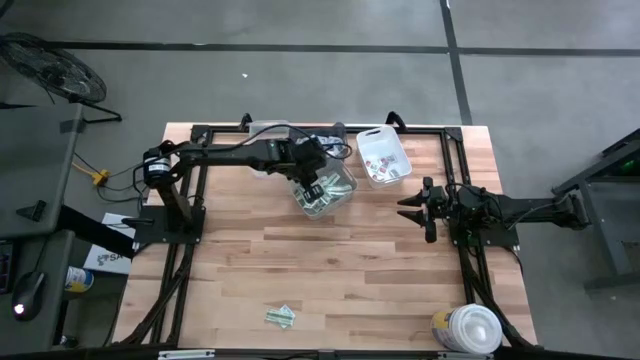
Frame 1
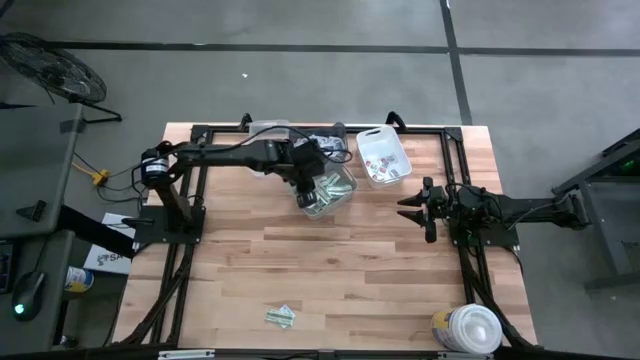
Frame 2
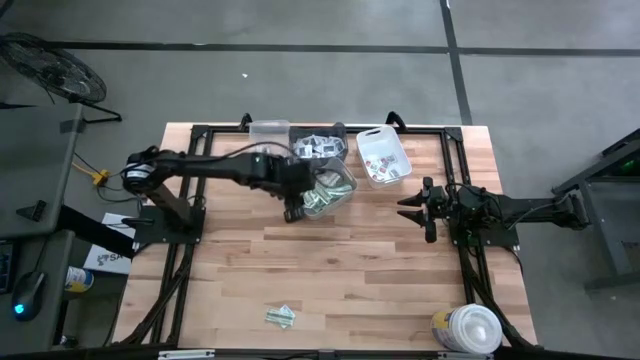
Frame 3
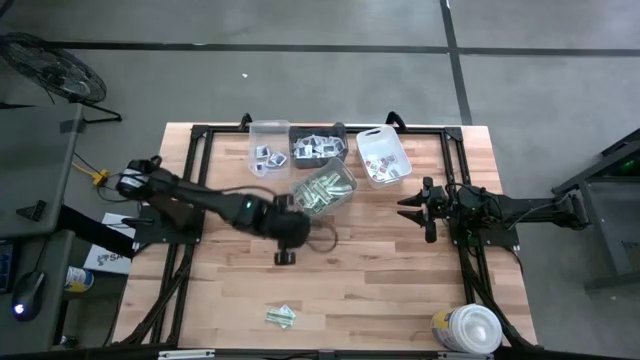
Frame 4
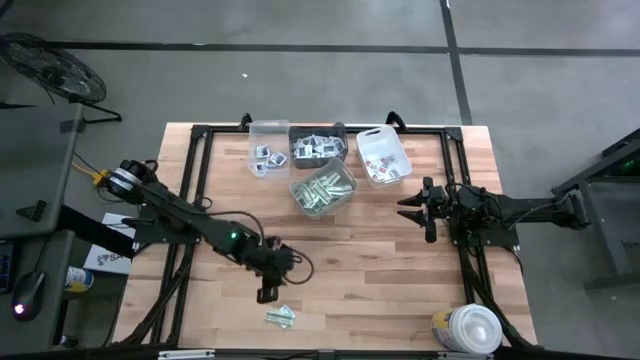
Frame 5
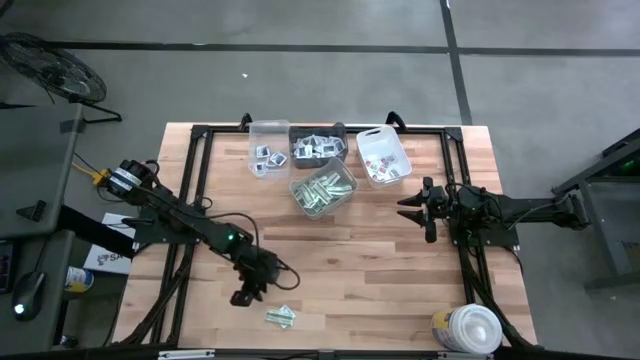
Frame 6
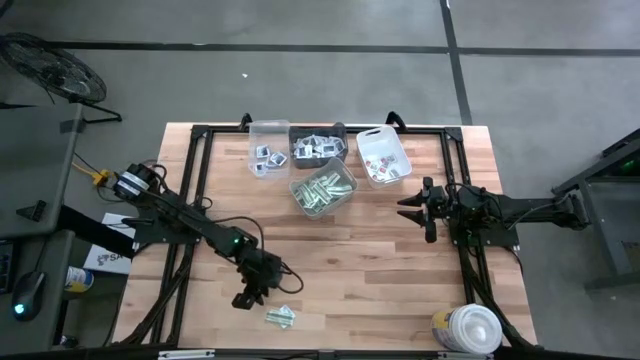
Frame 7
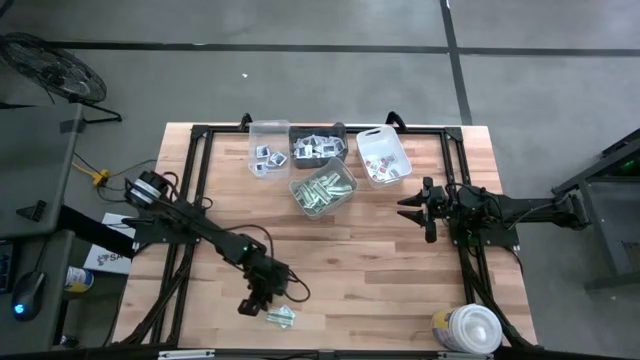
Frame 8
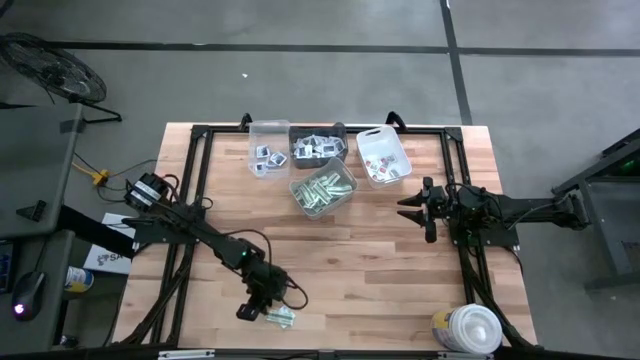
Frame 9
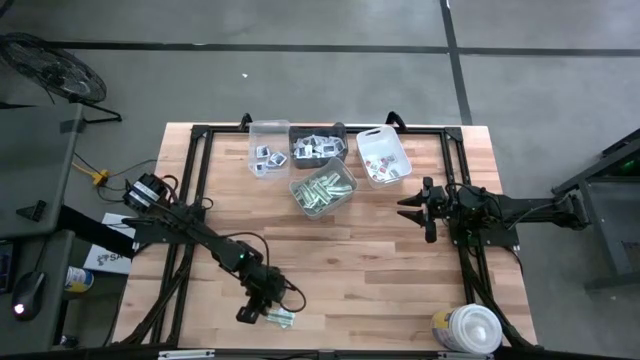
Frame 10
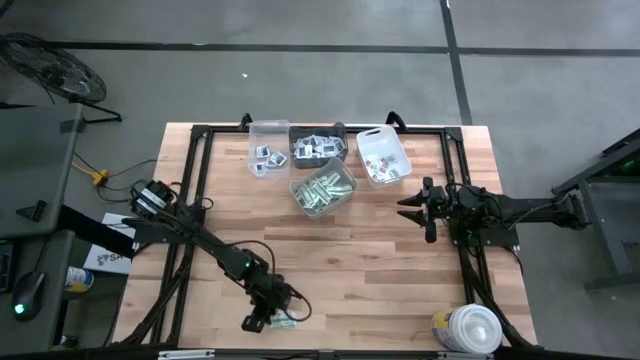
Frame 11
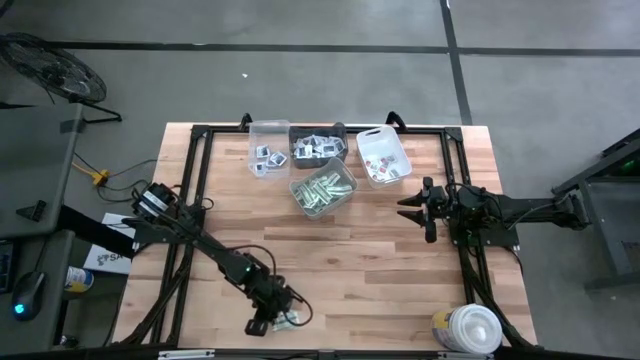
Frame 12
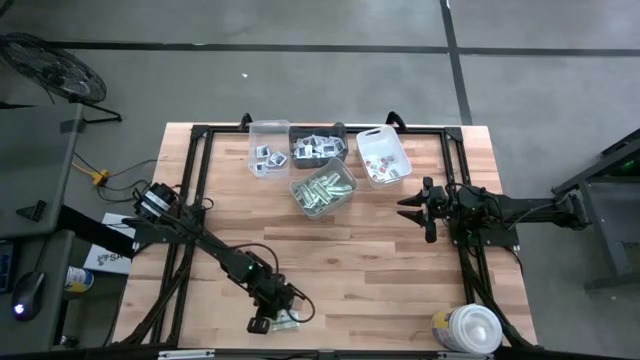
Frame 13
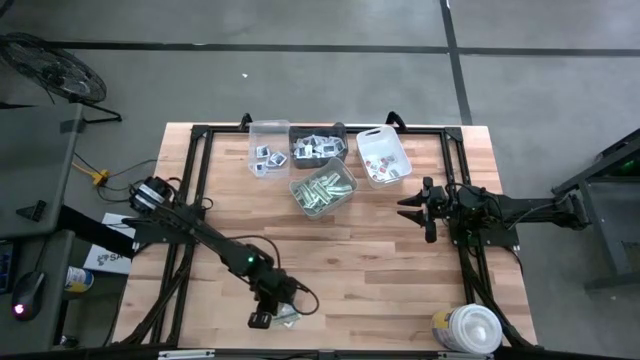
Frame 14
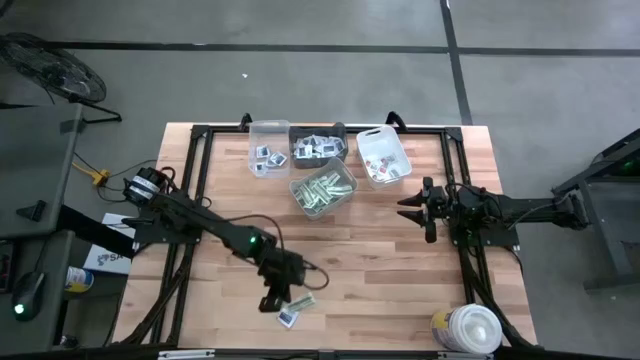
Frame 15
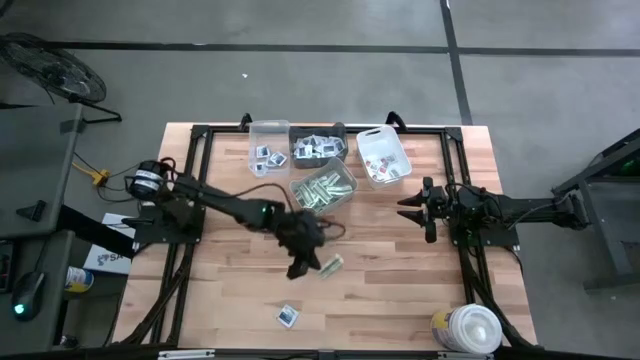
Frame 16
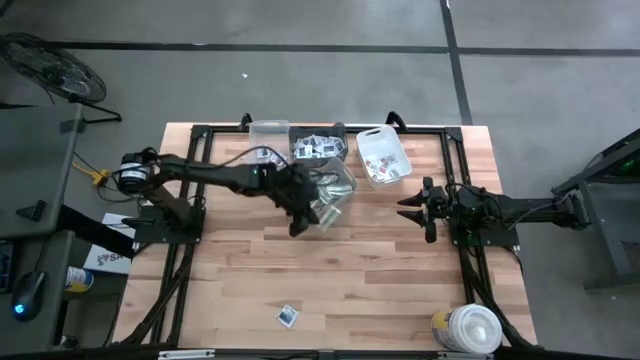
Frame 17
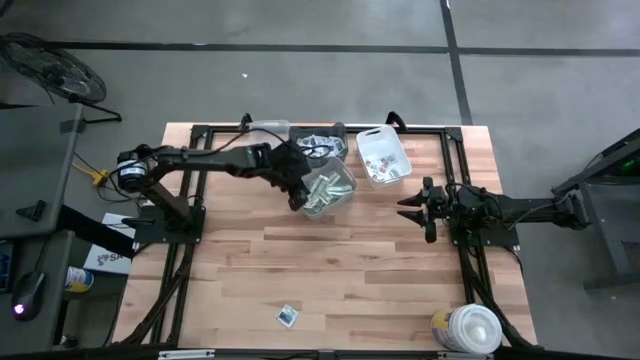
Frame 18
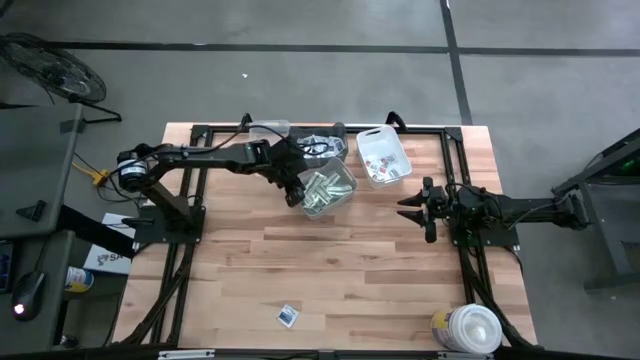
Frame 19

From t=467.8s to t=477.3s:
Task: Pick & Place First Aid Supplies
Put the bandage pack into the gray bin

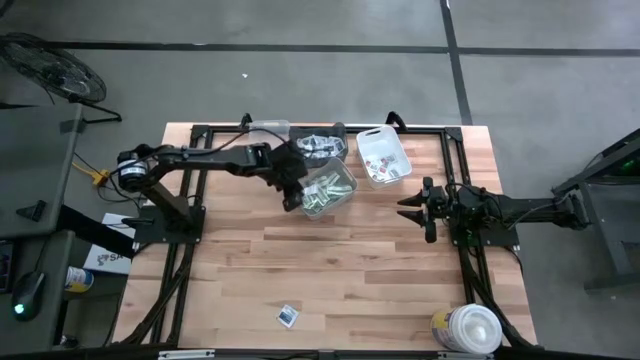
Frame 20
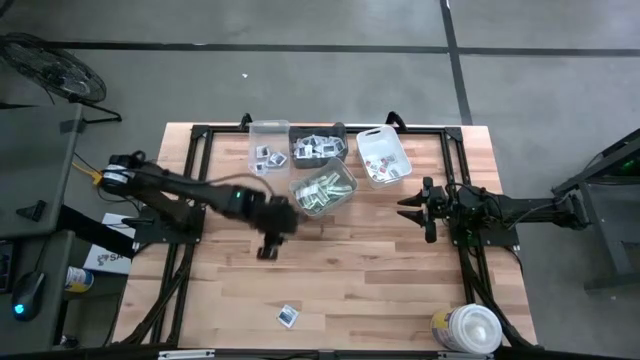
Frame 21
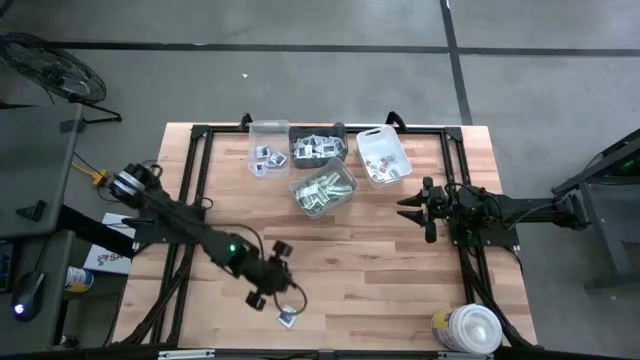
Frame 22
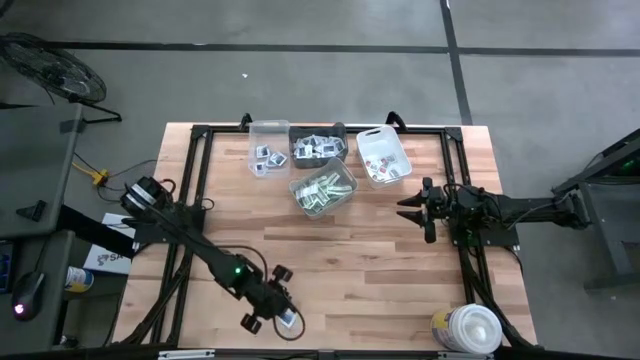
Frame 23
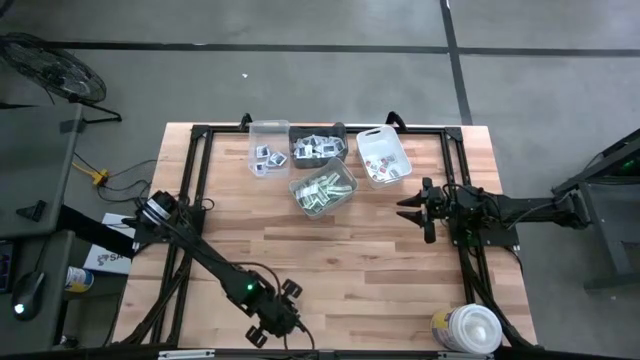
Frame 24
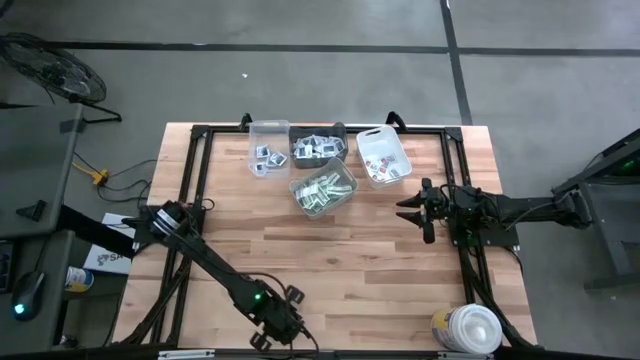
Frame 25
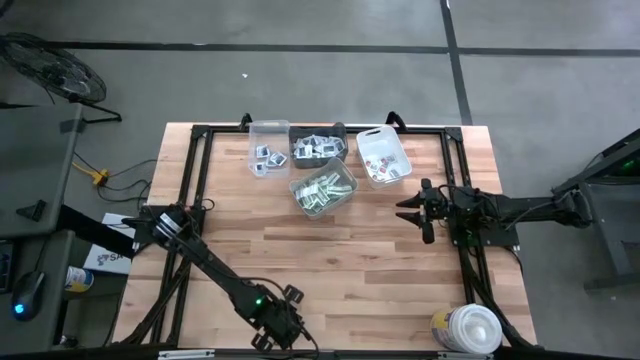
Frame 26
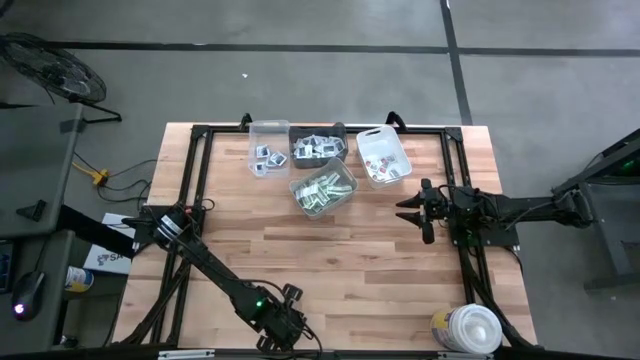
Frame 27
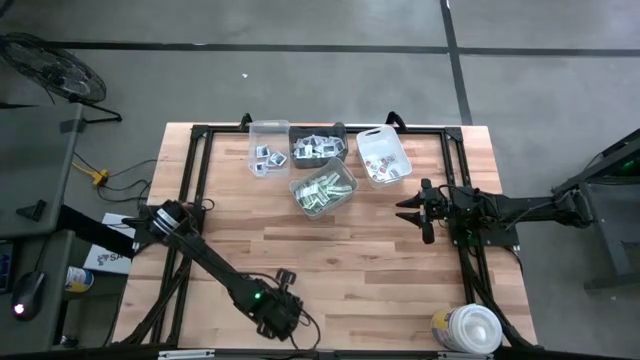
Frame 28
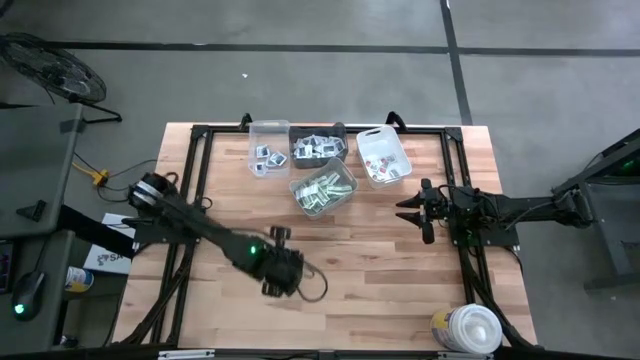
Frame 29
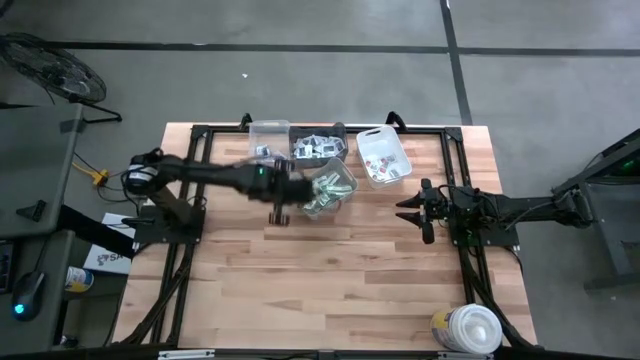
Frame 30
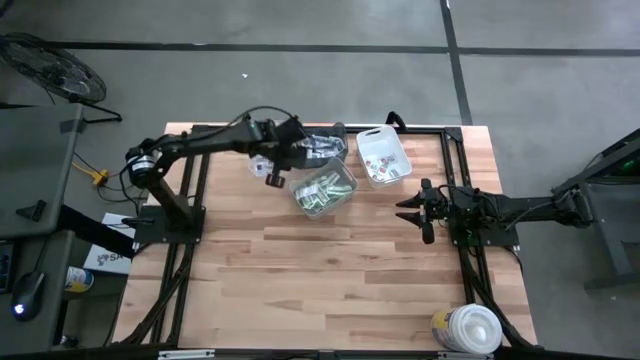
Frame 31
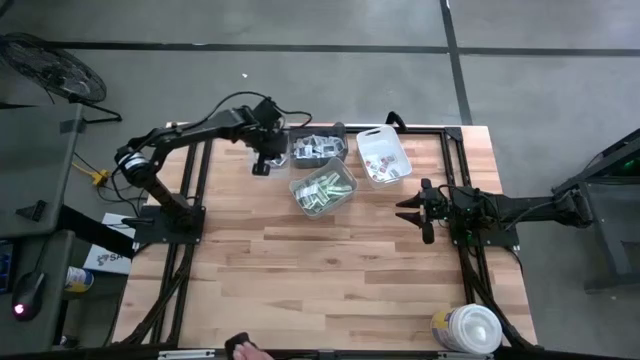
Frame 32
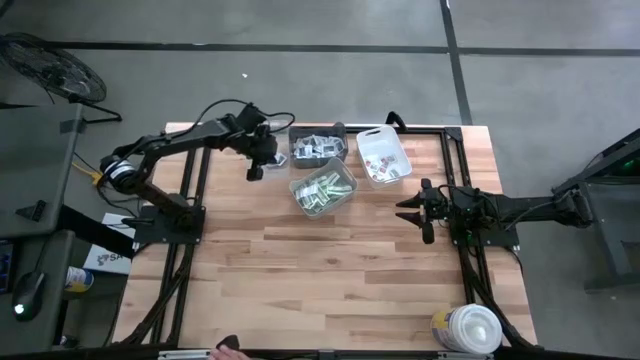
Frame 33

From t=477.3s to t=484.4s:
Put the alcohol pad into the transparent bin

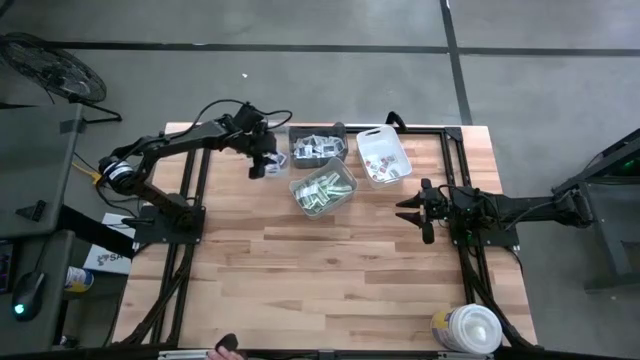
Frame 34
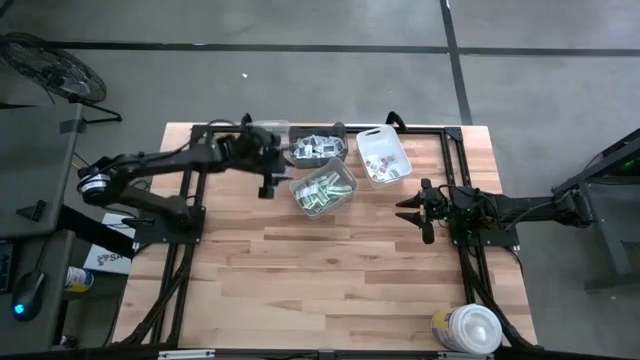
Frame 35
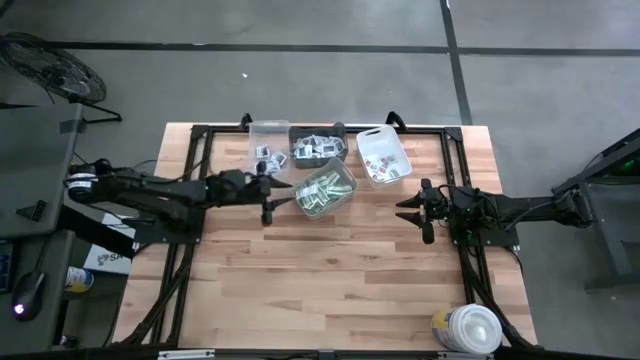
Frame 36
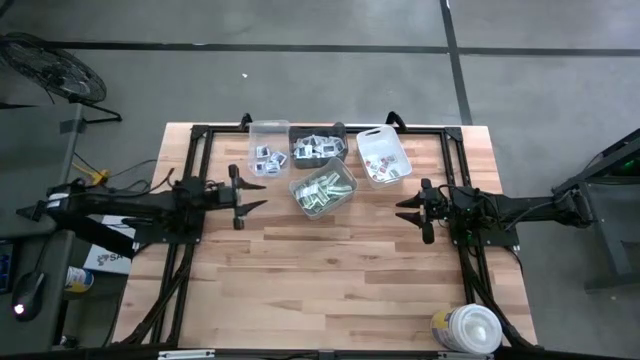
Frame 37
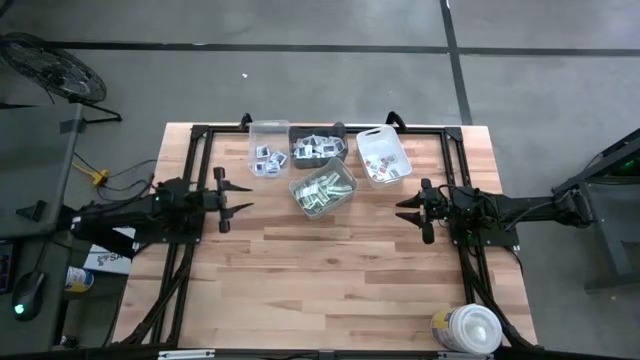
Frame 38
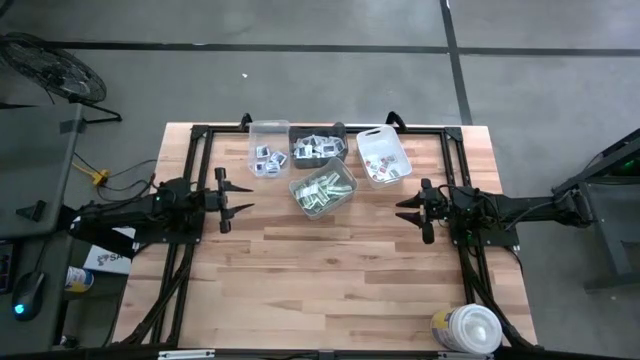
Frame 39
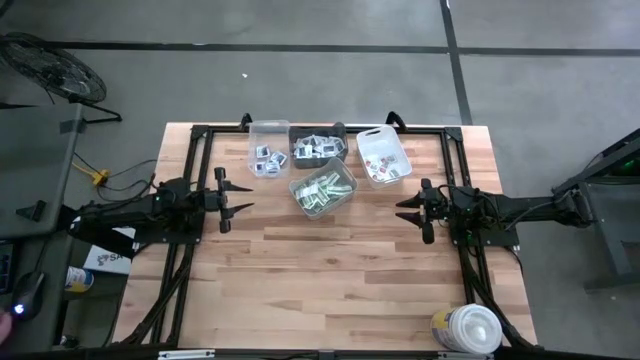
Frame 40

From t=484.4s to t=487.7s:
Return to Home Position

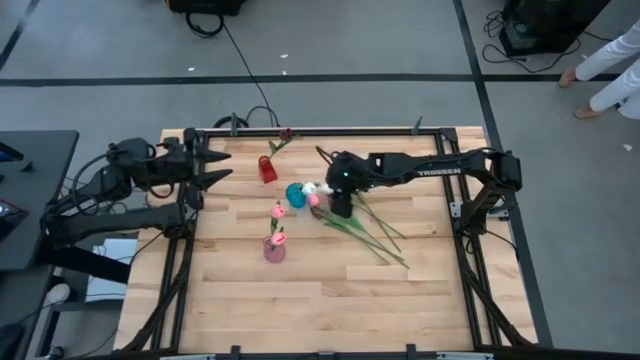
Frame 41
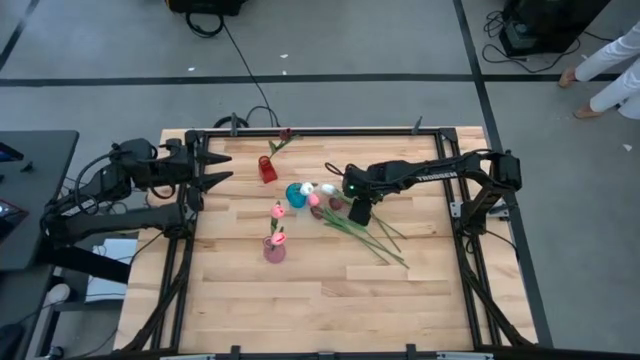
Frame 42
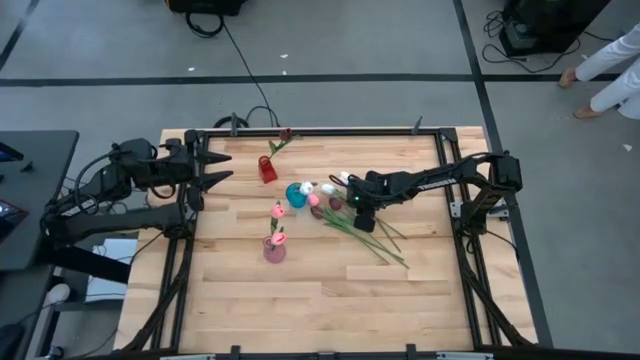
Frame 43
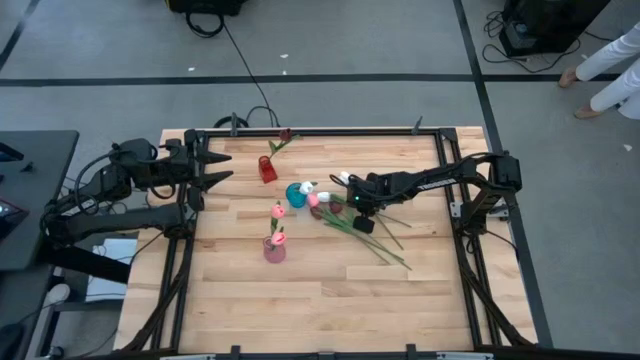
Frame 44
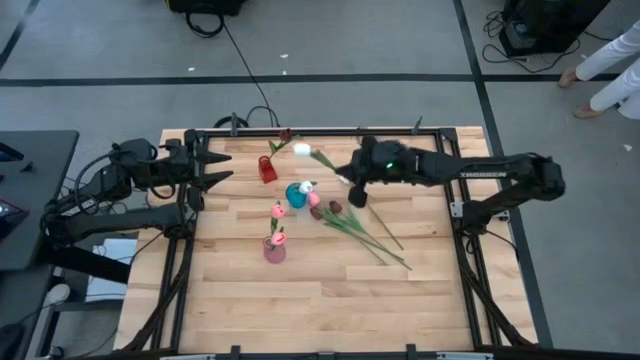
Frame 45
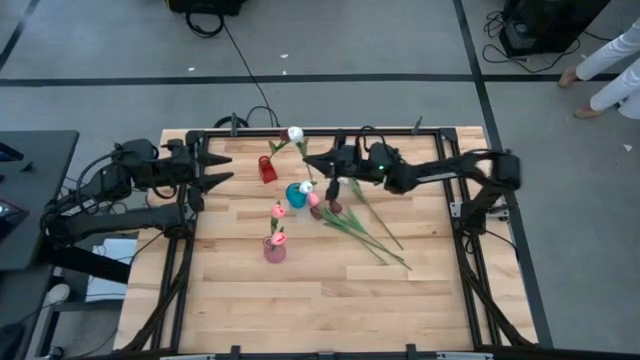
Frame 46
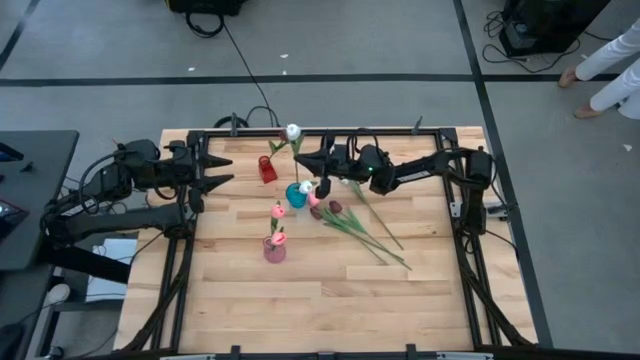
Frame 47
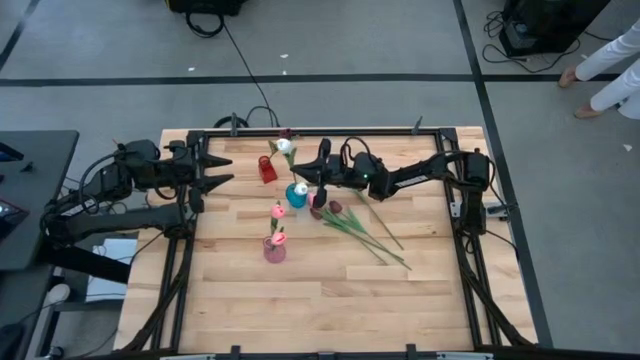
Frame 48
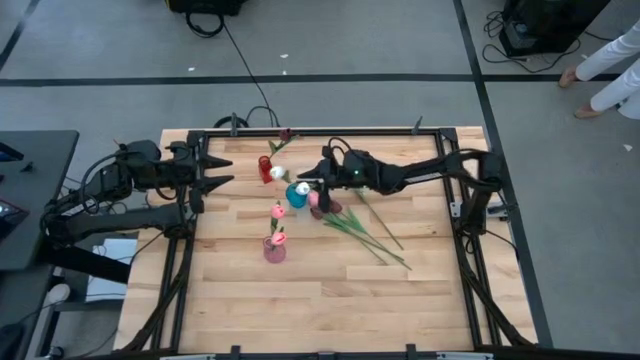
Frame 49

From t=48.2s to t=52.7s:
Task: Sort flowers into vase by color
Put the left white flower into the blue vase
